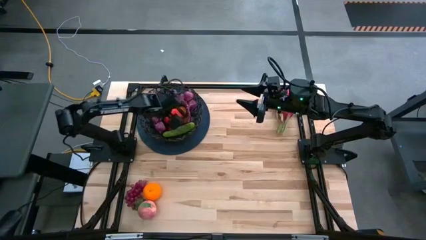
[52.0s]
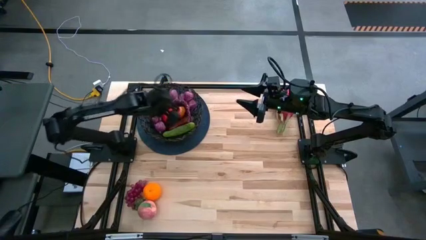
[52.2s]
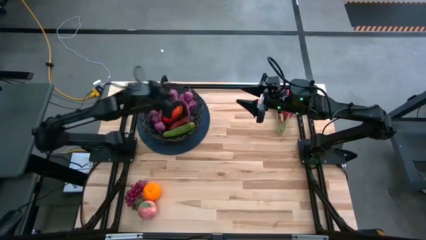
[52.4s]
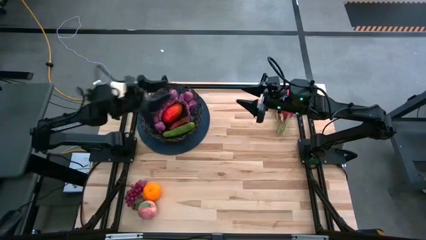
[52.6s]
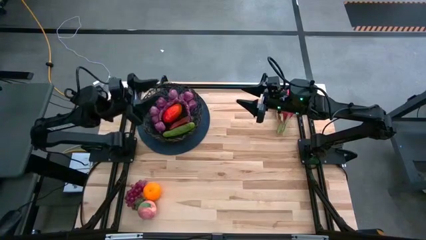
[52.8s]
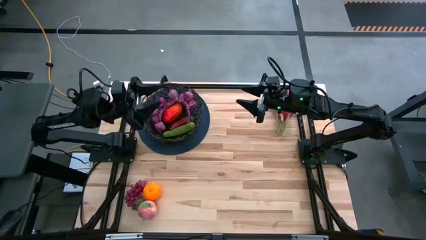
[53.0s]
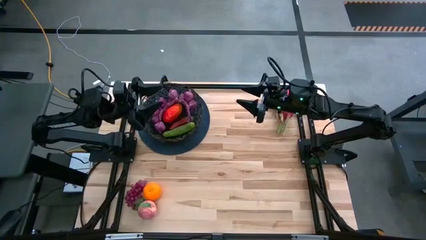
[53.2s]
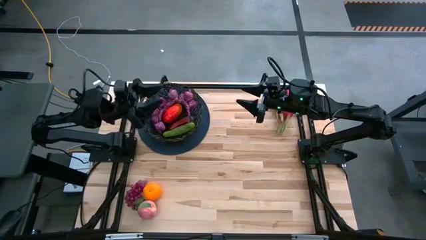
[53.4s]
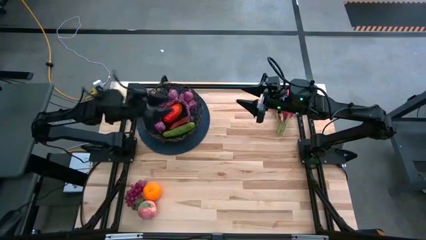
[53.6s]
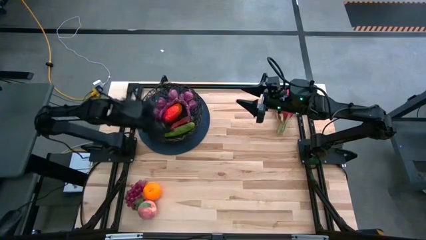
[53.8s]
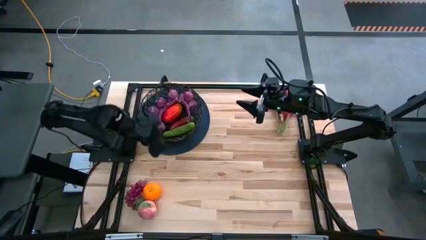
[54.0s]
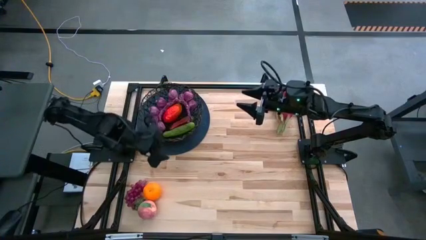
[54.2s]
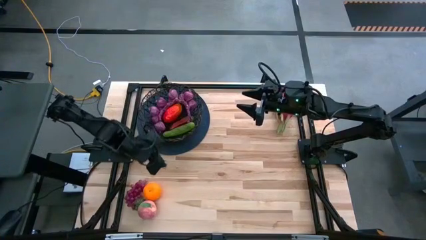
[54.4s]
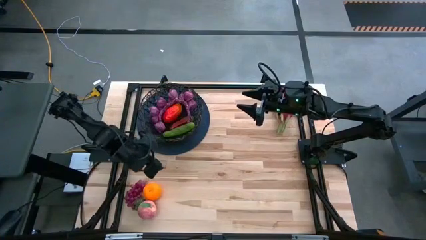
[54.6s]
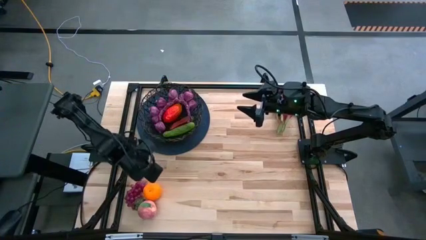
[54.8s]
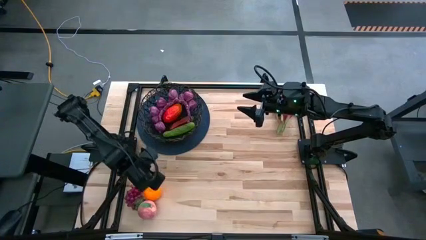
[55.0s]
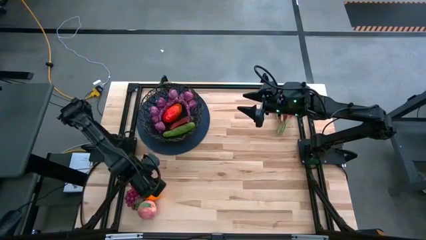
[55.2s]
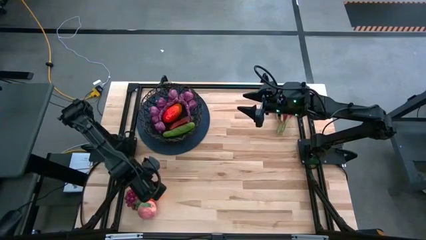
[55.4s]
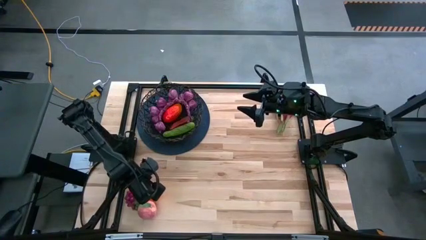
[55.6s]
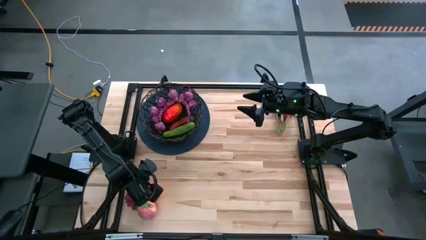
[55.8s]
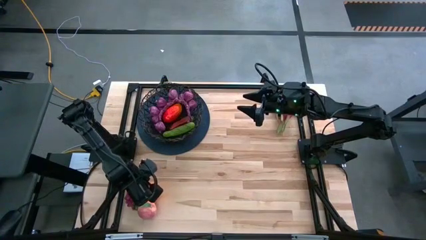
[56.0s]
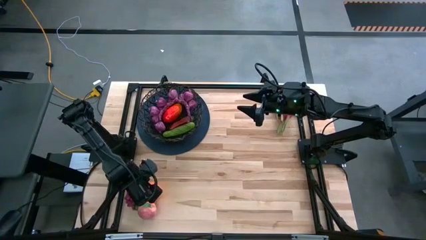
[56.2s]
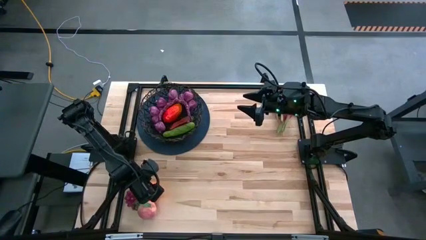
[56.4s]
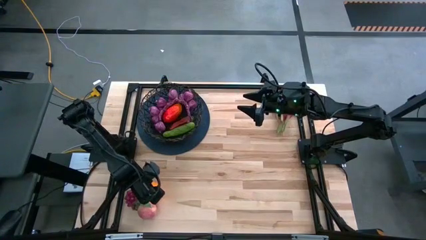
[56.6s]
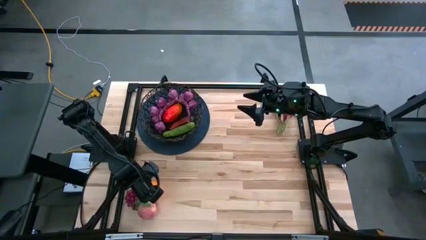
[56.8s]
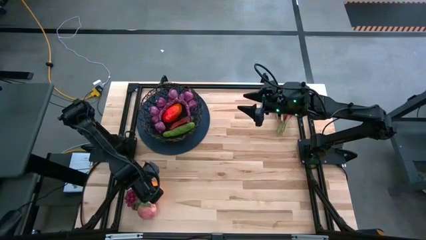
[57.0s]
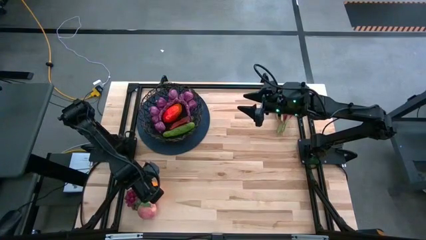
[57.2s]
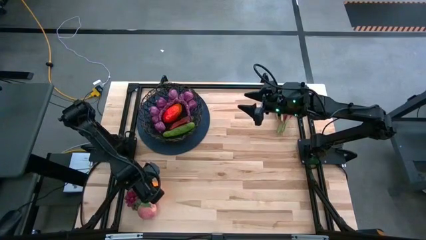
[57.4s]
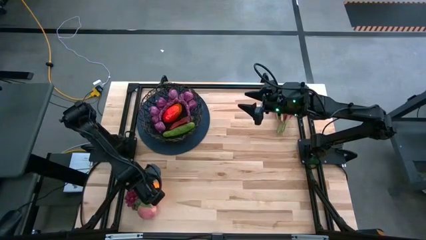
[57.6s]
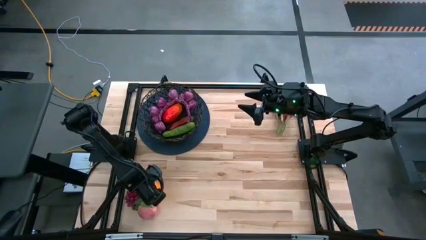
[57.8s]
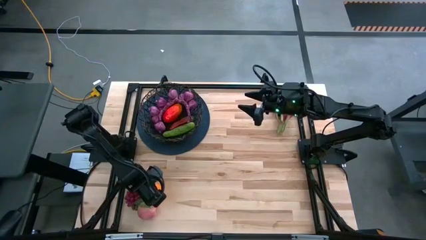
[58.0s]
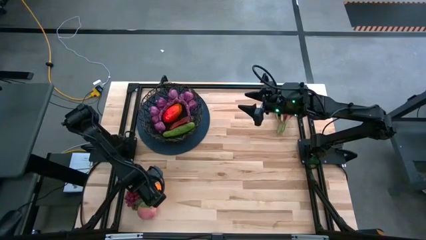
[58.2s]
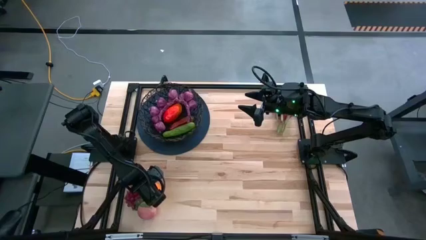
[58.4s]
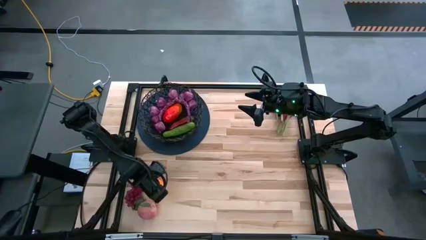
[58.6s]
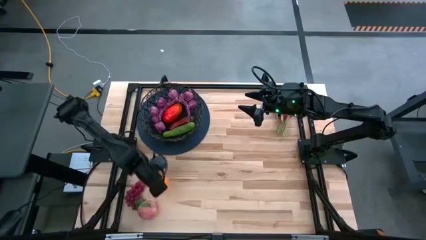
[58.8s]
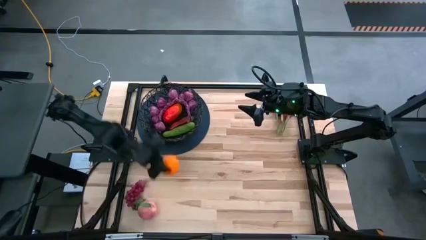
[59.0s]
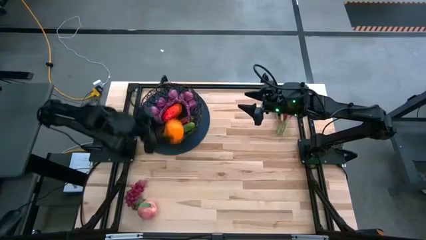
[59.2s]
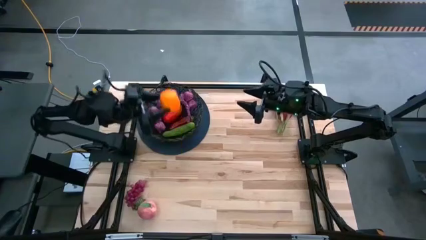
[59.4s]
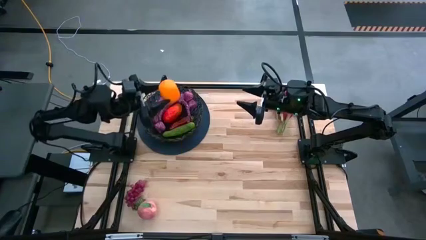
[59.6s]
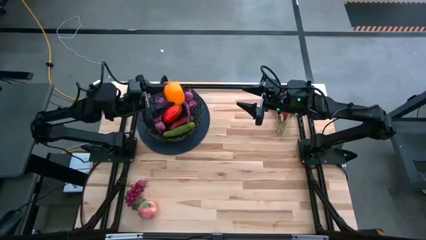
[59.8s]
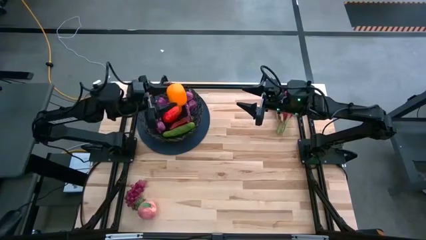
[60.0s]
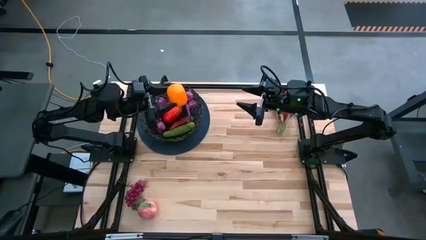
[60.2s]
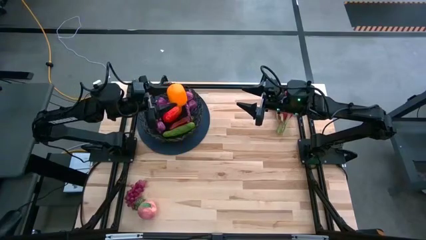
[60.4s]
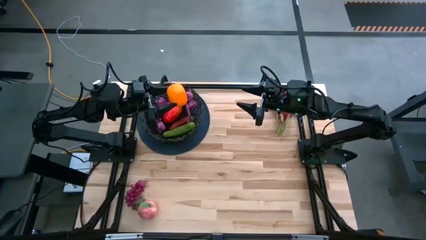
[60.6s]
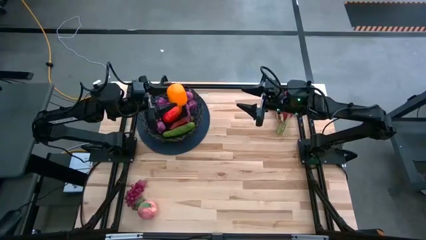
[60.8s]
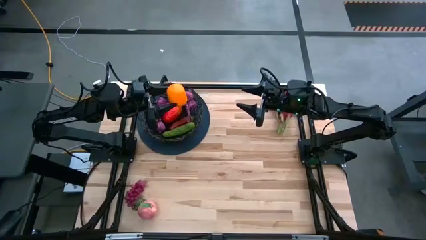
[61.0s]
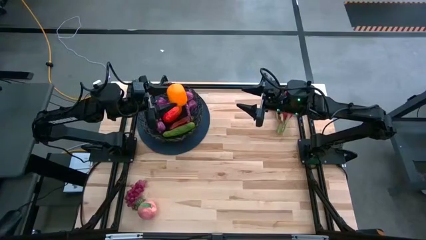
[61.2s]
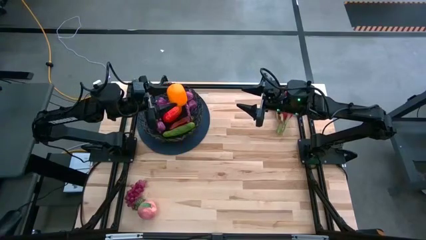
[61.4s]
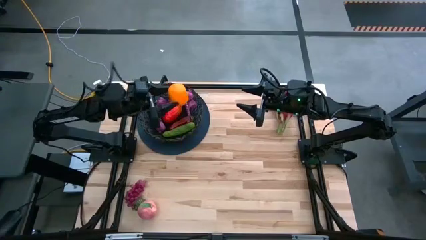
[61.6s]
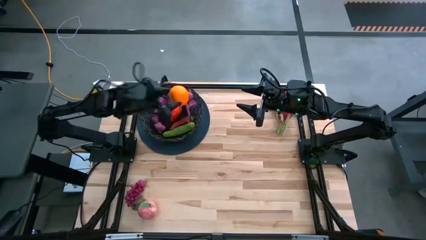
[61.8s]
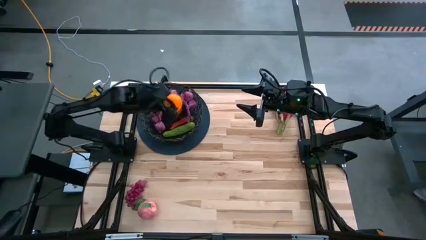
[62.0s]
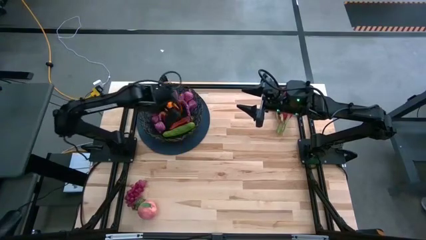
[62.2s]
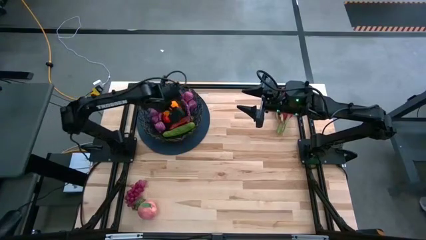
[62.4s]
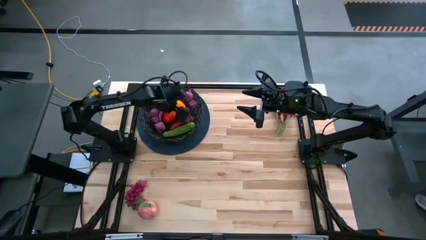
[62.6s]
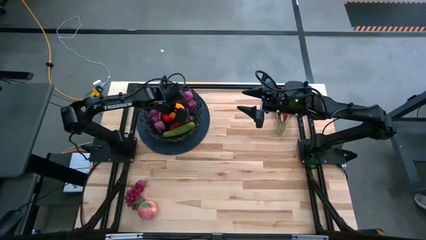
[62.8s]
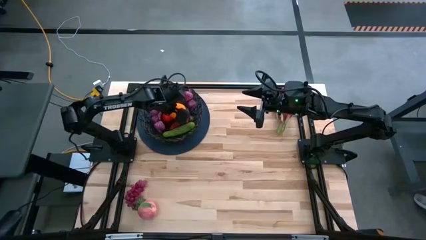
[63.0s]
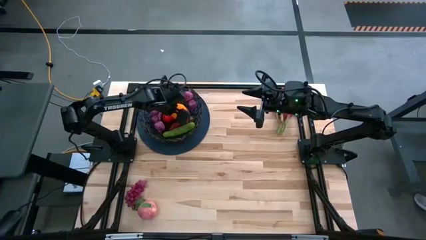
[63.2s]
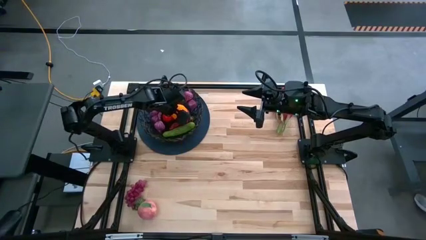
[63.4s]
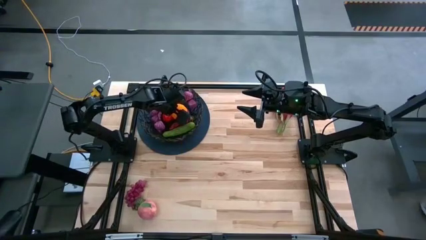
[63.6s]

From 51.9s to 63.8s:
Task: Build produce basket
Put the orange into the black wire basket
